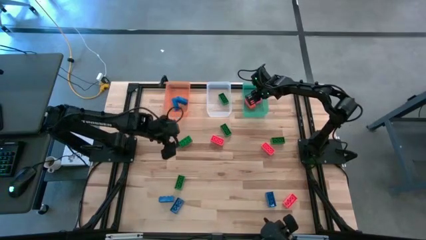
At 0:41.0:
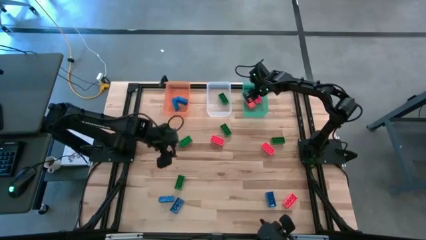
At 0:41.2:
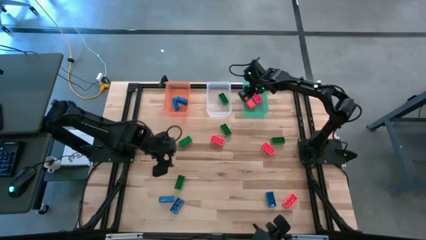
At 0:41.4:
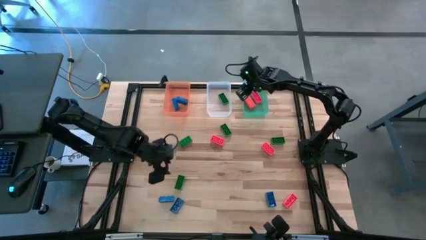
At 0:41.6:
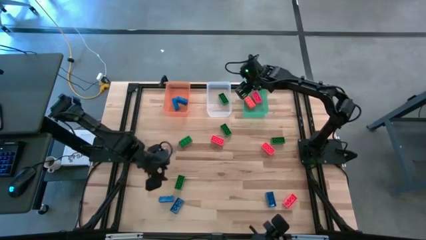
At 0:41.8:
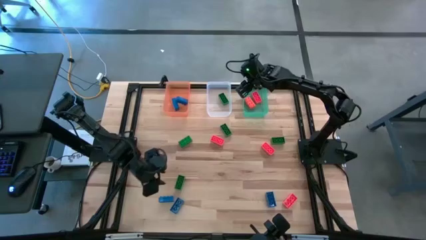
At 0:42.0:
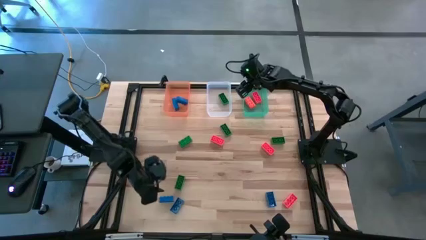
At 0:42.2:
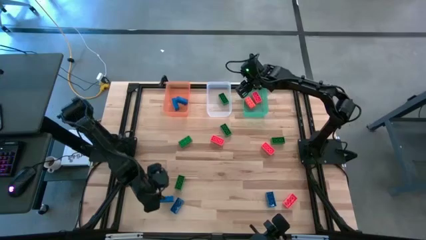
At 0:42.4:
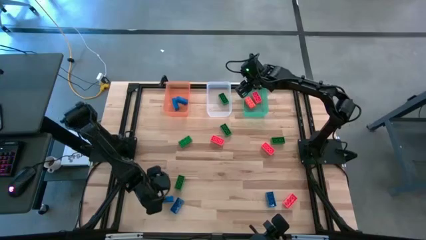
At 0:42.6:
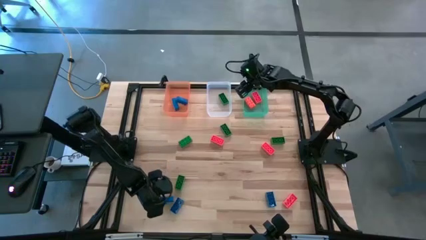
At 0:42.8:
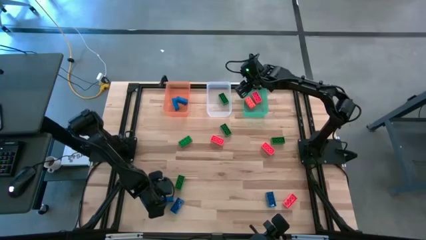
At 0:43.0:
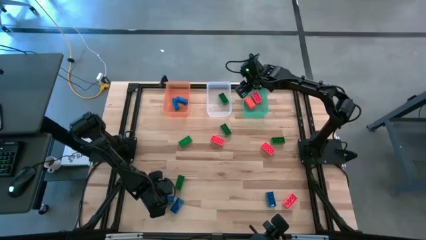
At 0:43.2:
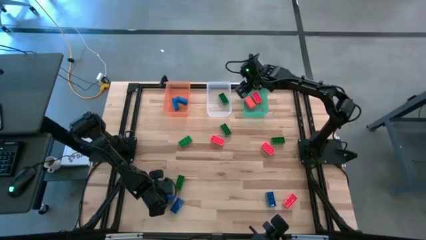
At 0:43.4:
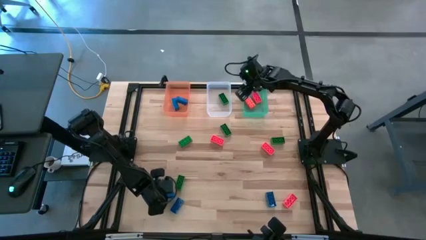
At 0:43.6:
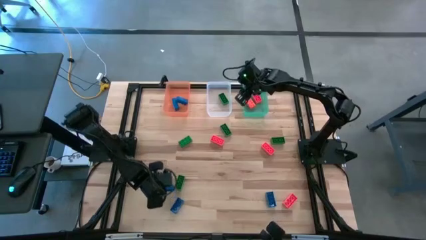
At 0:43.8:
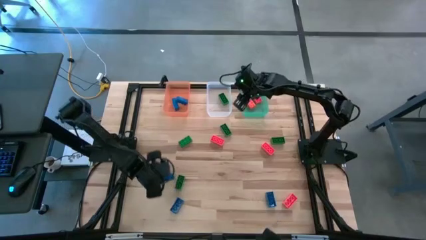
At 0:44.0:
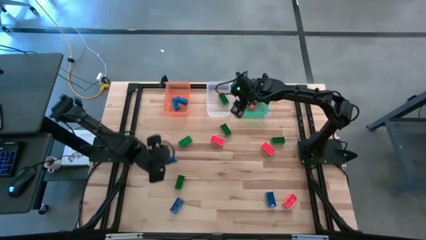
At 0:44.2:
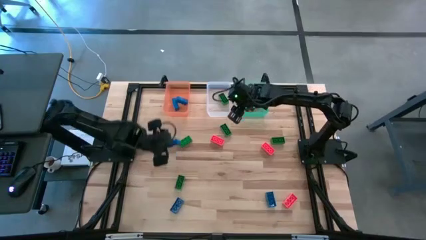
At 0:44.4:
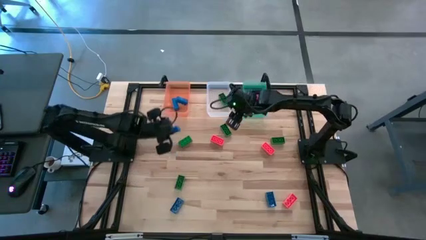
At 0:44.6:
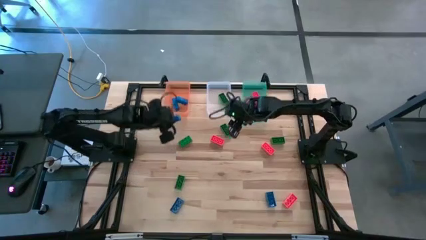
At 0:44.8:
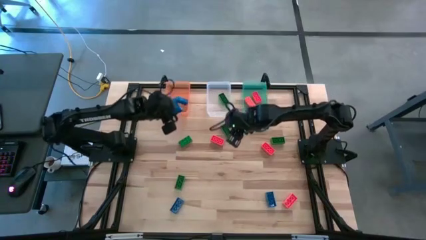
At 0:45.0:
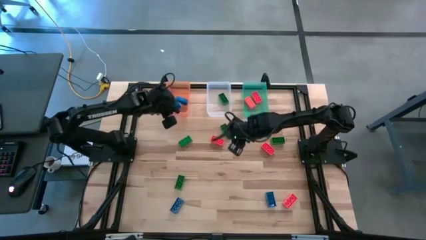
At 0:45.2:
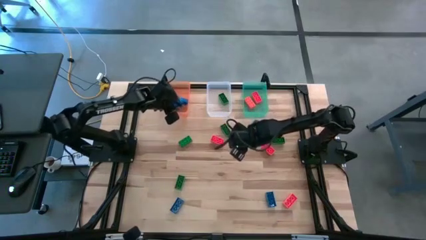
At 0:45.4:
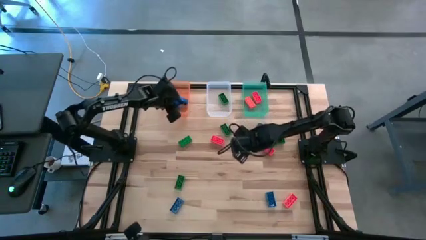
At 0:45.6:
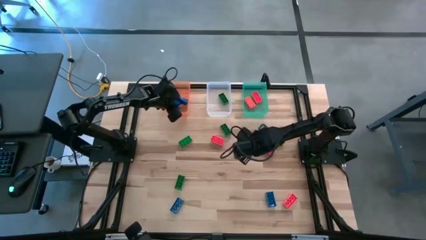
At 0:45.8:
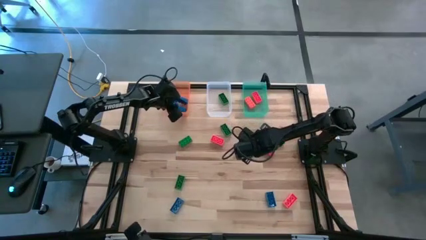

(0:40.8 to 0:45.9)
Task: Sort & place blocks by color
Put the blue game piece into the bin

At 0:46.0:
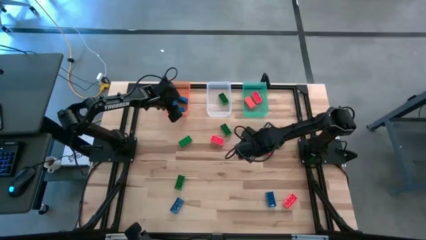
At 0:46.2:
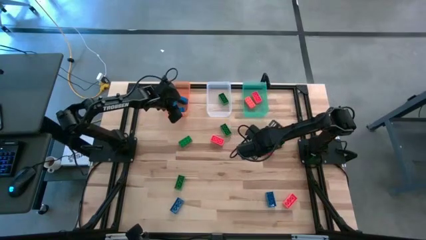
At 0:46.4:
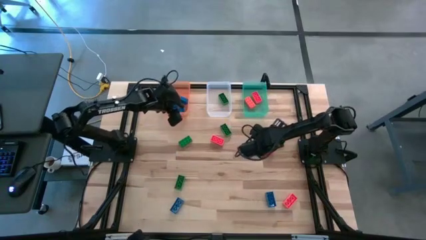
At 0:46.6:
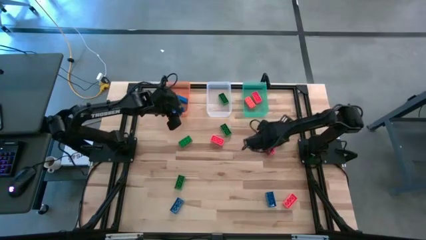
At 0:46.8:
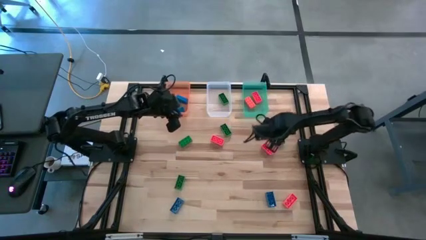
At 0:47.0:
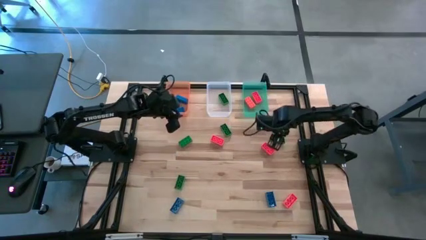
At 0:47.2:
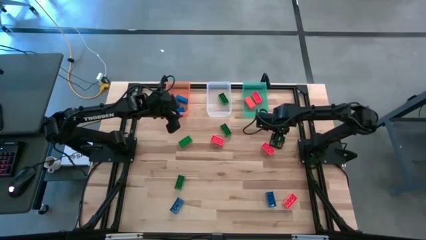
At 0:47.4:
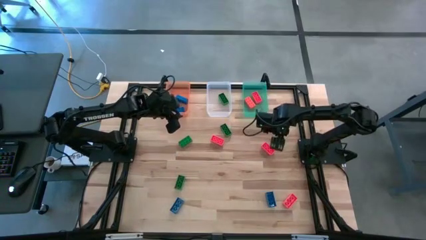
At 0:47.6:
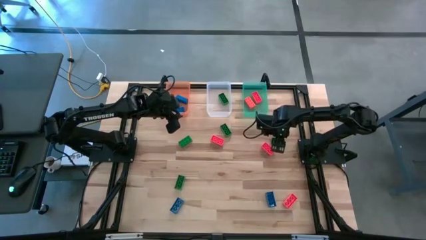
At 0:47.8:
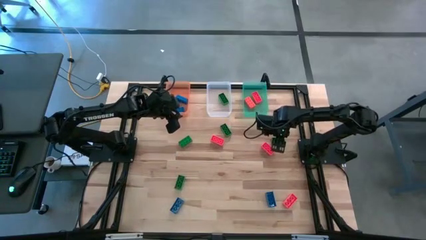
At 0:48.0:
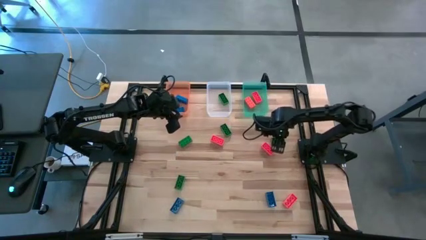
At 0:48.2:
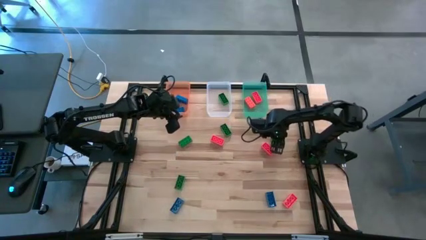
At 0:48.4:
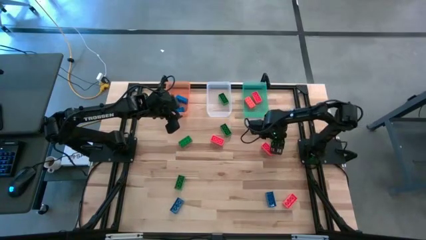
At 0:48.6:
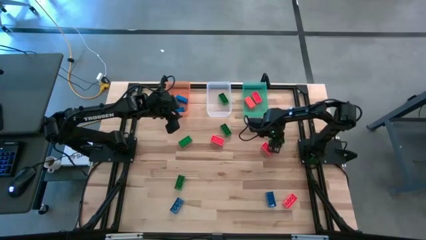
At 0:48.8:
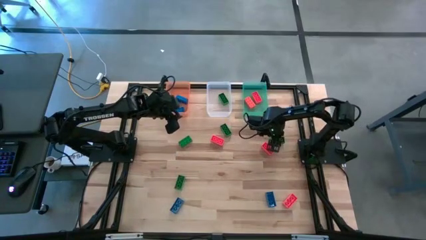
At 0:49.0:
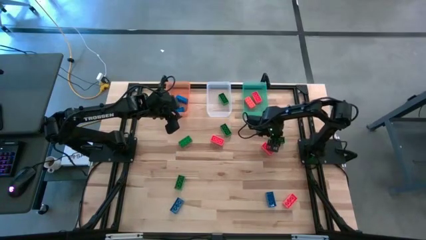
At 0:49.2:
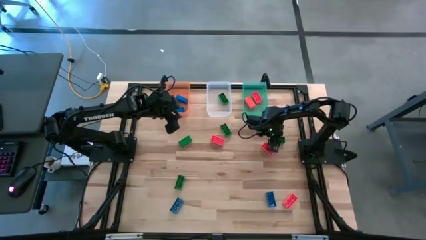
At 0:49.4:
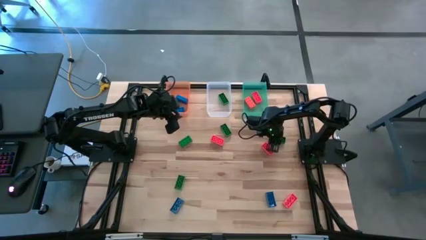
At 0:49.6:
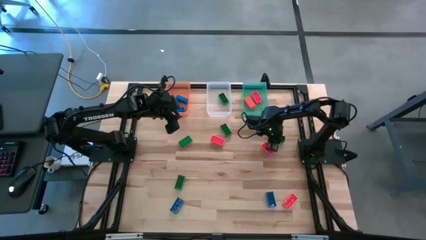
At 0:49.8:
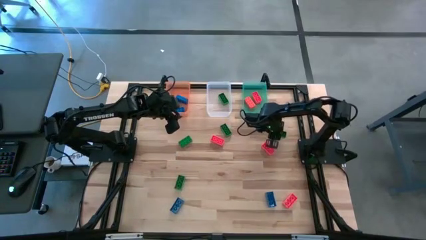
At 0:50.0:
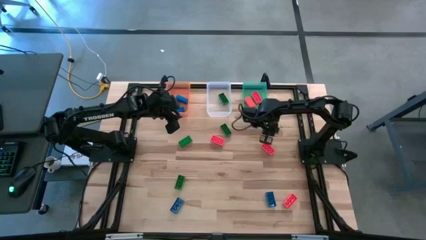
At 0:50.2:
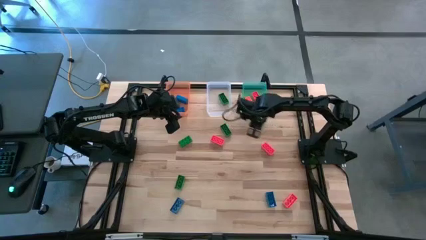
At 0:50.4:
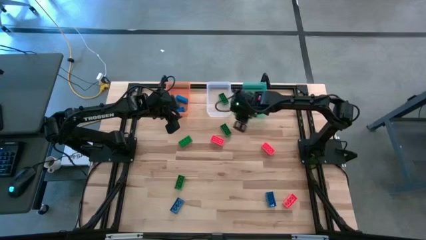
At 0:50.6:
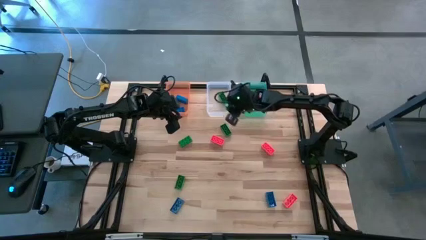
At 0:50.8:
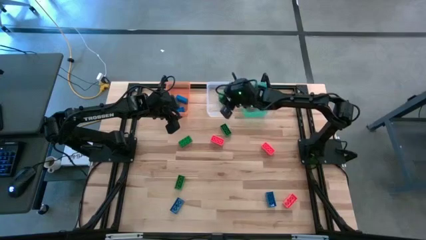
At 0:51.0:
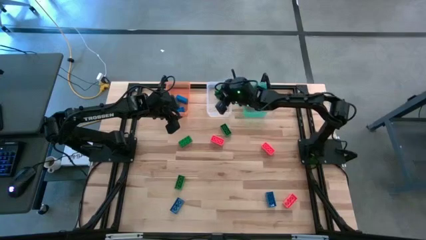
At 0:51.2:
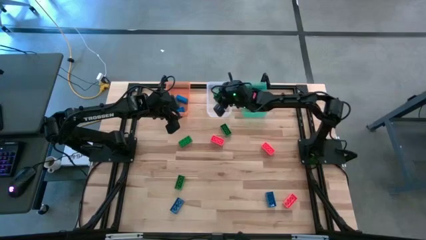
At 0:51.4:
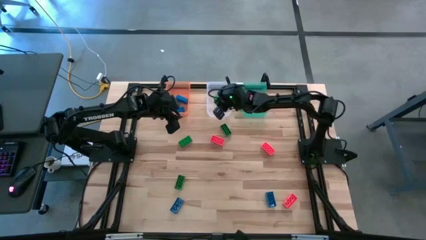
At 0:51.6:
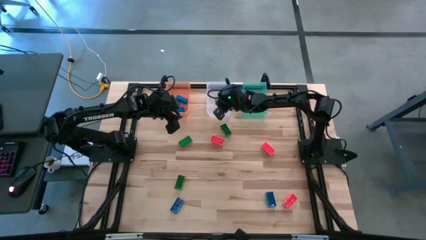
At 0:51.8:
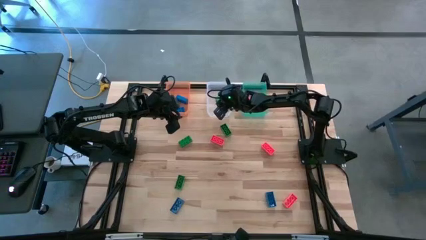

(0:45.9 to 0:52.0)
Put the green game piece into the bin

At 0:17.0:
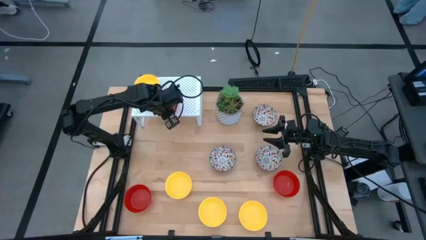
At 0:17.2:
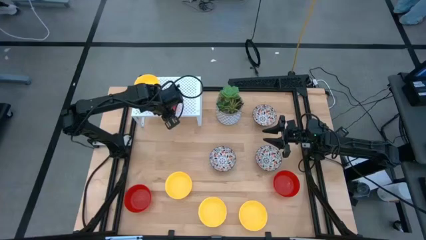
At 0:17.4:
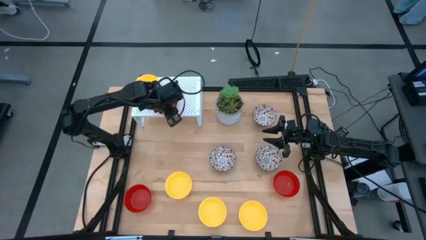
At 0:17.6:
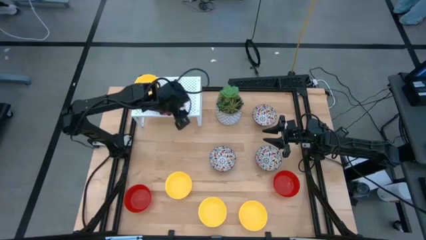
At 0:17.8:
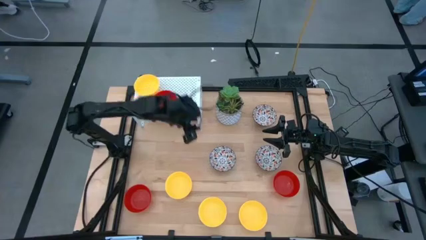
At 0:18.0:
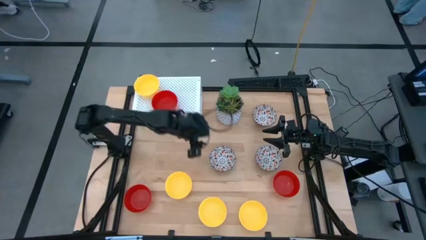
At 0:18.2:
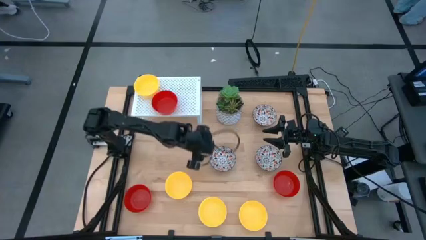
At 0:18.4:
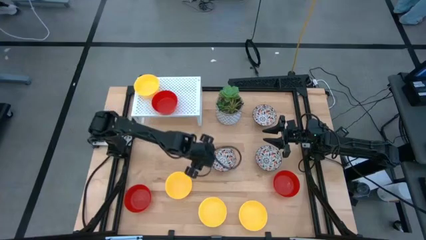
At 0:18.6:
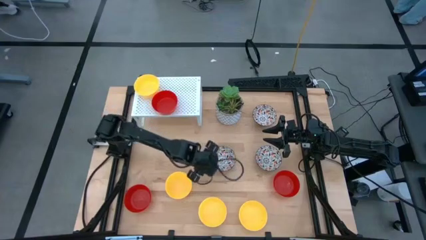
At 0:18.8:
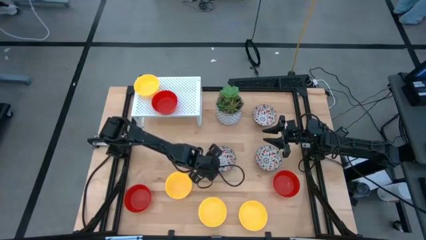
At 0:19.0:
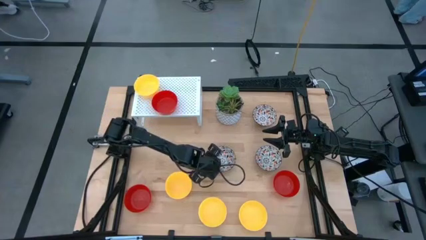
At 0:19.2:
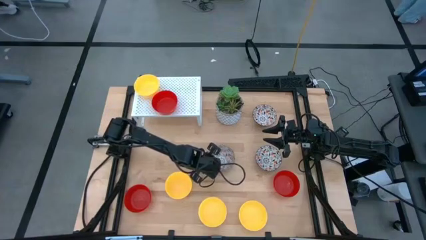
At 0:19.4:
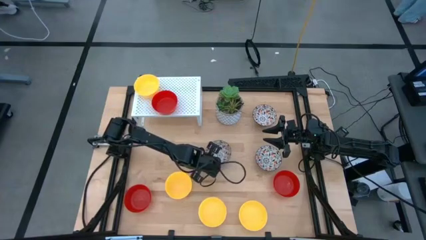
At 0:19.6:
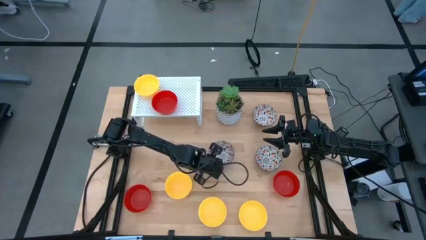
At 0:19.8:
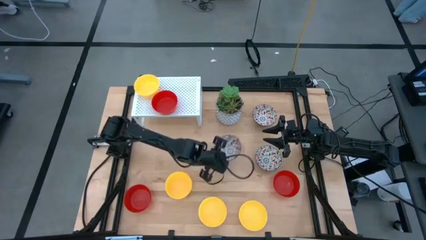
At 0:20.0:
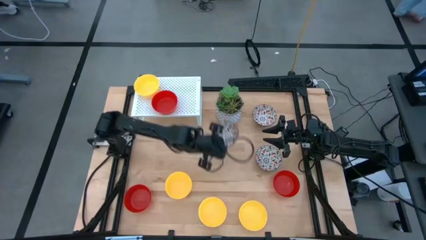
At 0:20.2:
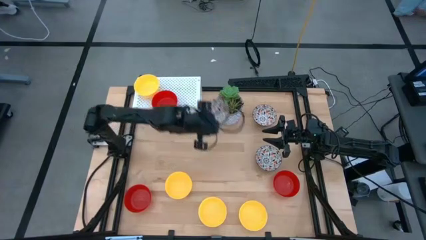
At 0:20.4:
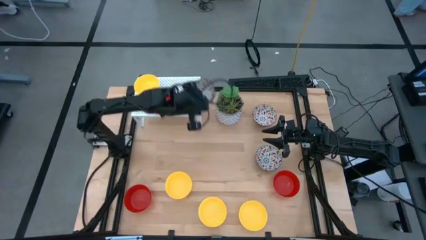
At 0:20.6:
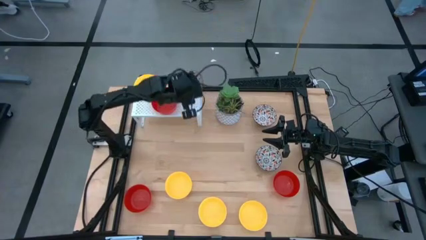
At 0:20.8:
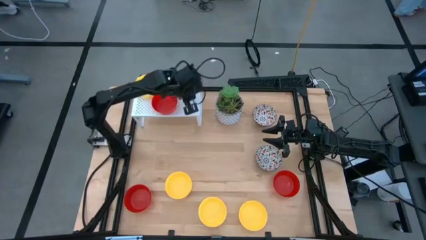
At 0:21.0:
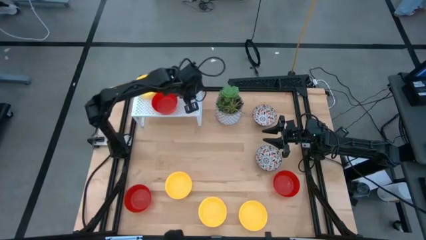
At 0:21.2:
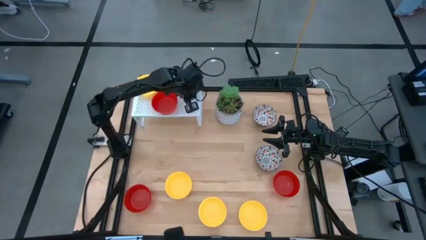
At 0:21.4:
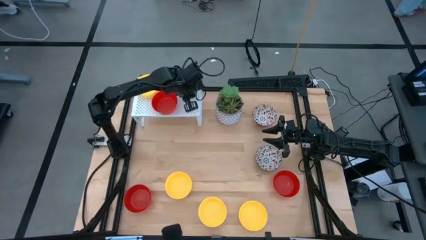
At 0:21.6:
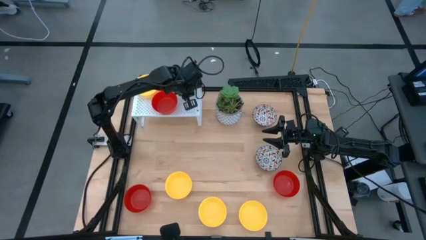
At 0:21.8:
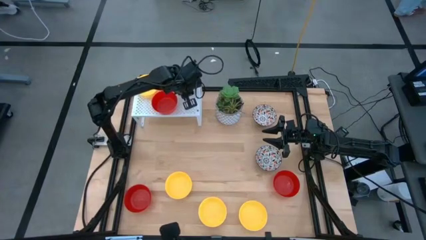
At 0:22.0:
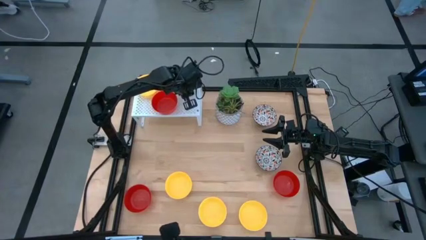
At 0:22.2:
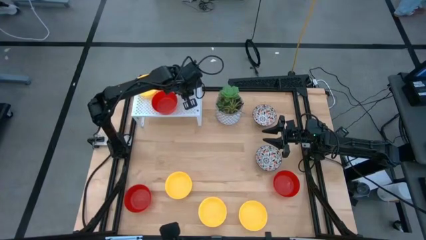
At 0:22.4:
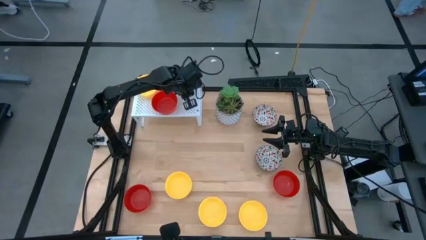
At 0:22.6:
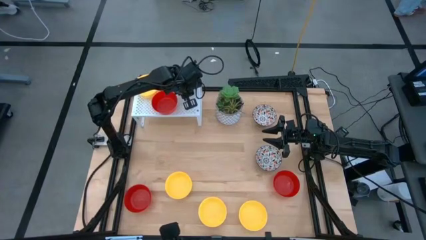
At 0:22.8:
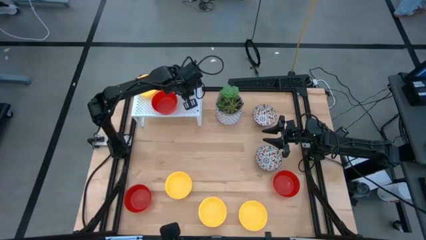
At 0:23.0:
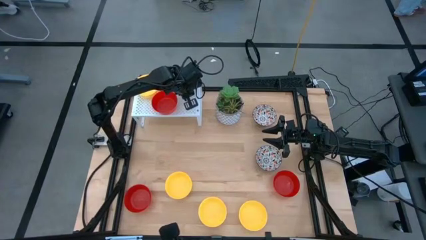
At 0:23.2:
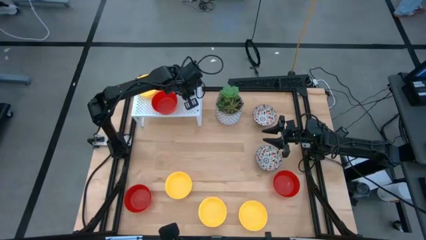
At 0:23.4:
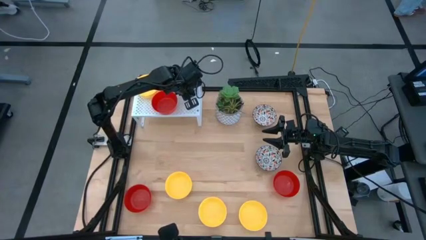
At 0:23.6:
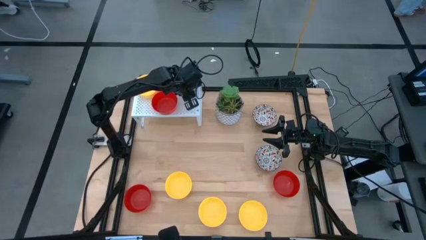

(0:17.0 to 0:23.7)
Task: Pick & Place Mini bowls
Put the patterned bowl on the shelf
